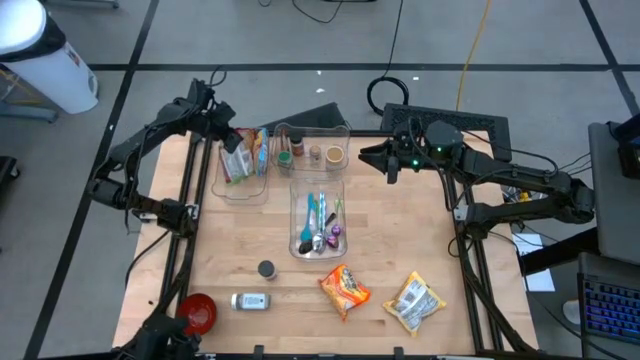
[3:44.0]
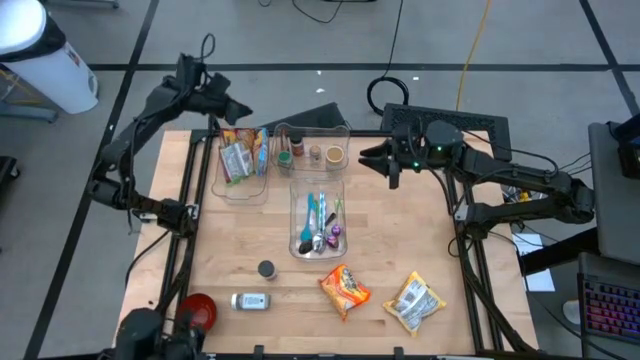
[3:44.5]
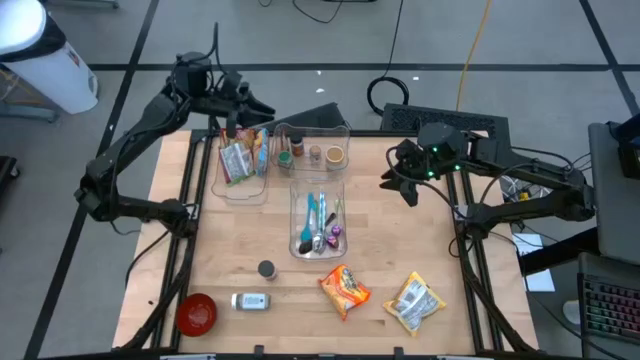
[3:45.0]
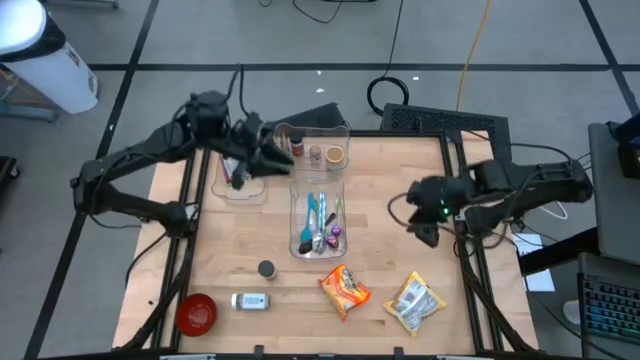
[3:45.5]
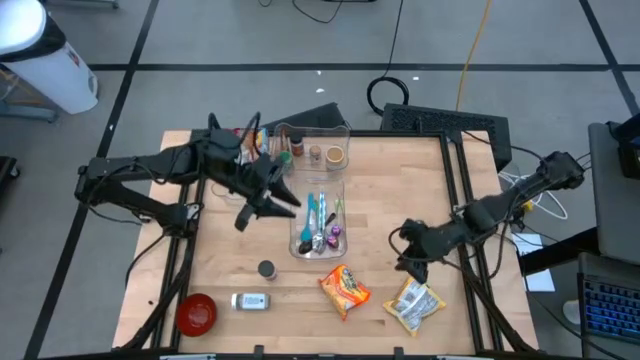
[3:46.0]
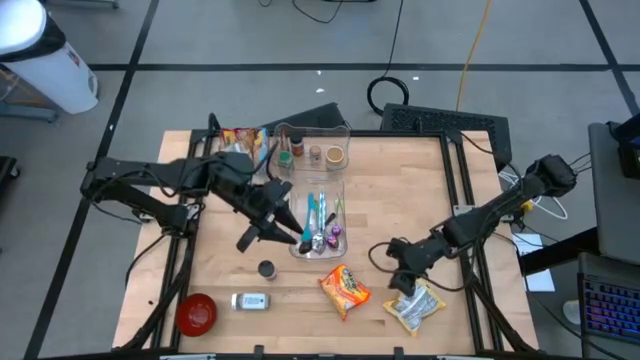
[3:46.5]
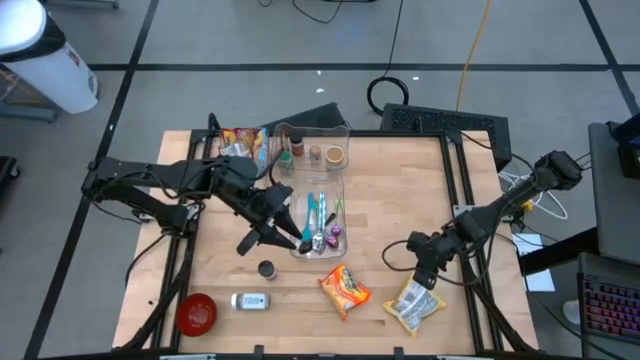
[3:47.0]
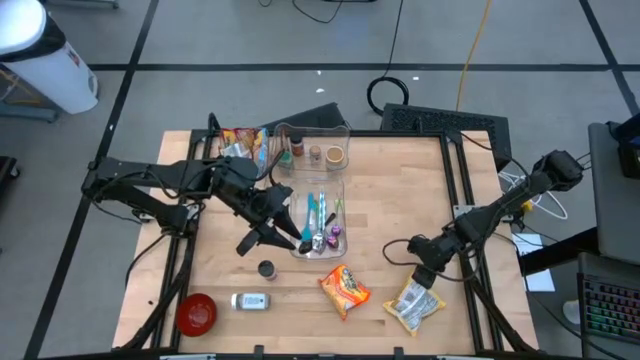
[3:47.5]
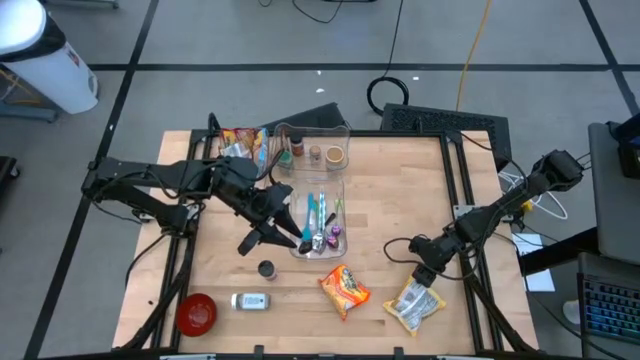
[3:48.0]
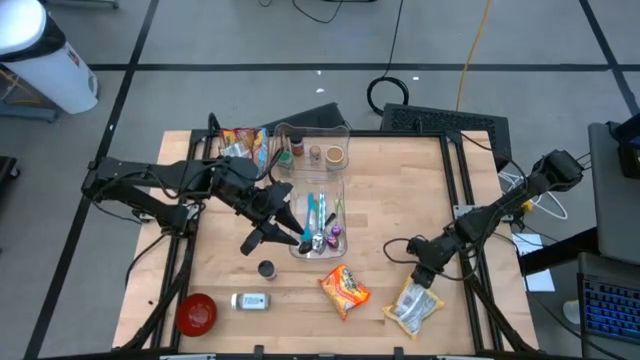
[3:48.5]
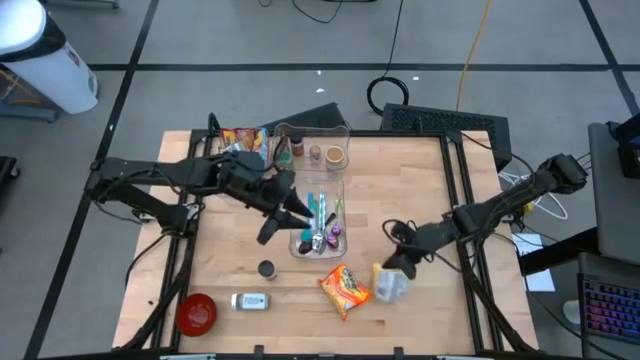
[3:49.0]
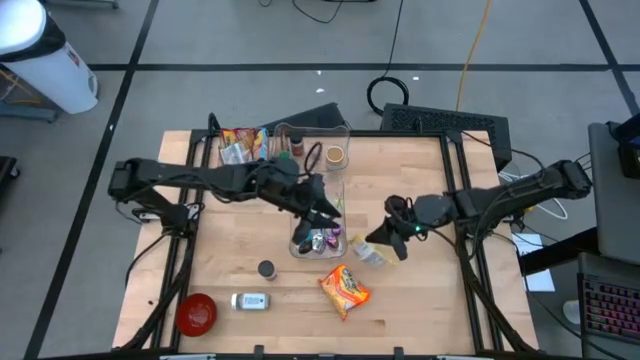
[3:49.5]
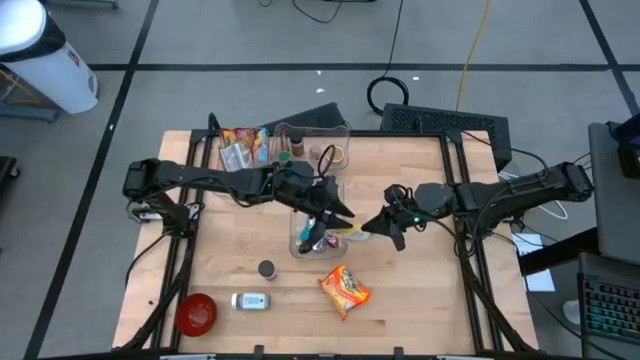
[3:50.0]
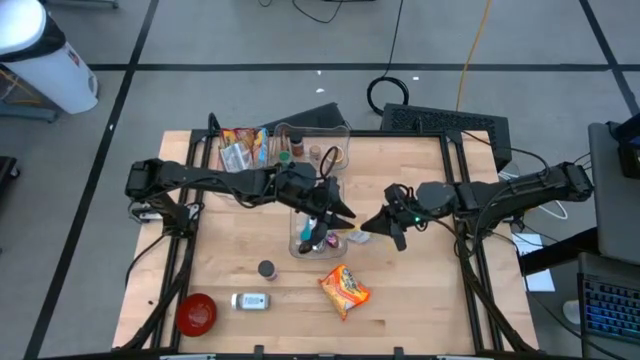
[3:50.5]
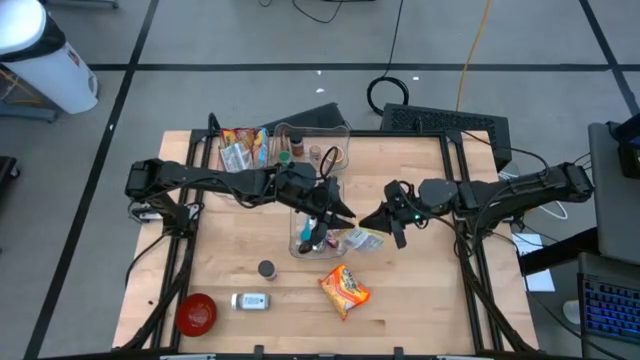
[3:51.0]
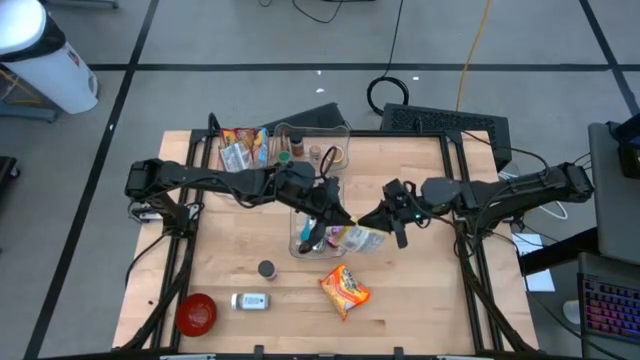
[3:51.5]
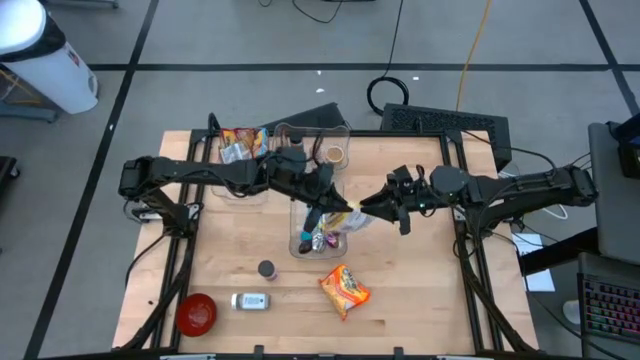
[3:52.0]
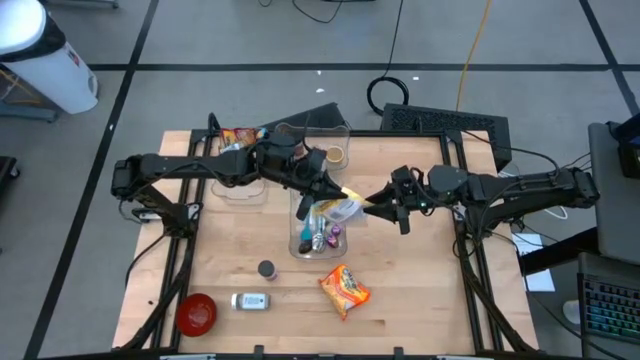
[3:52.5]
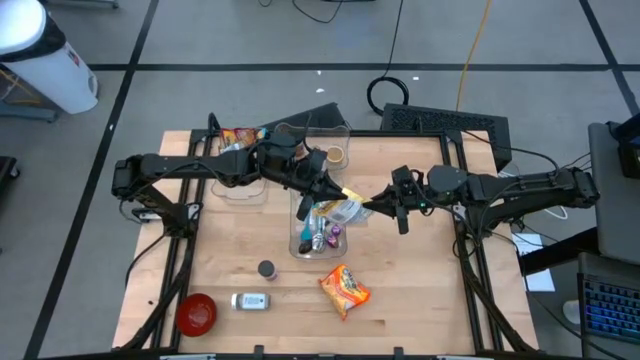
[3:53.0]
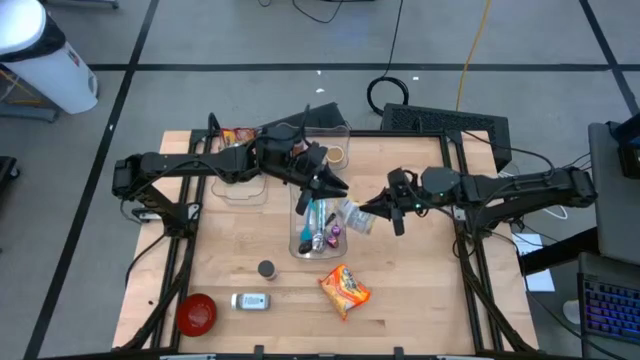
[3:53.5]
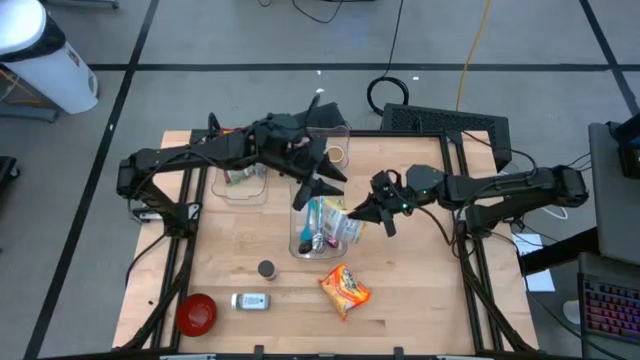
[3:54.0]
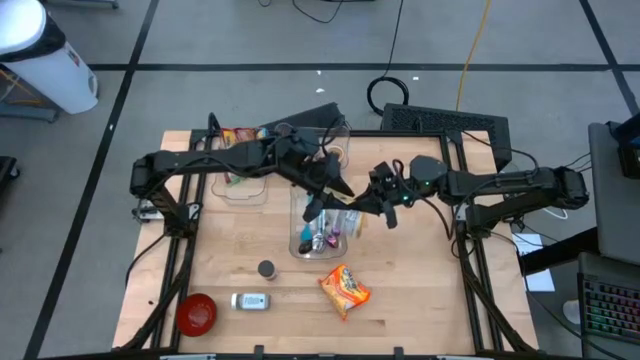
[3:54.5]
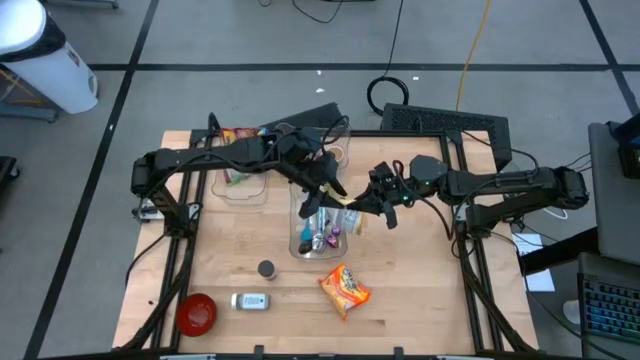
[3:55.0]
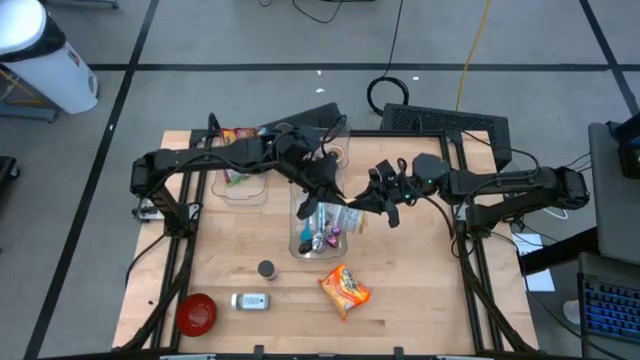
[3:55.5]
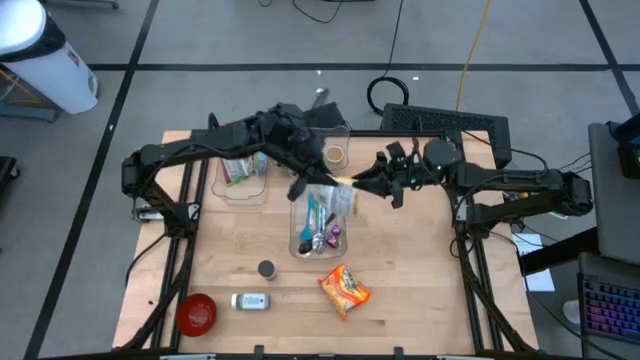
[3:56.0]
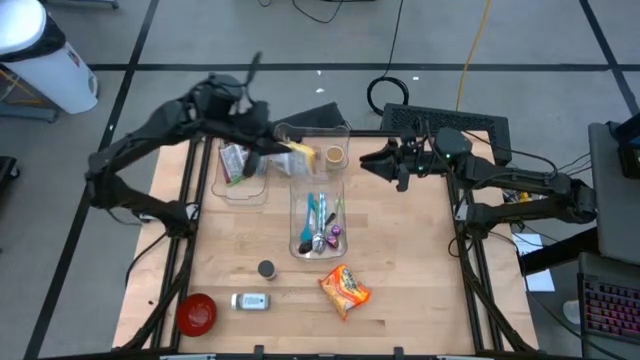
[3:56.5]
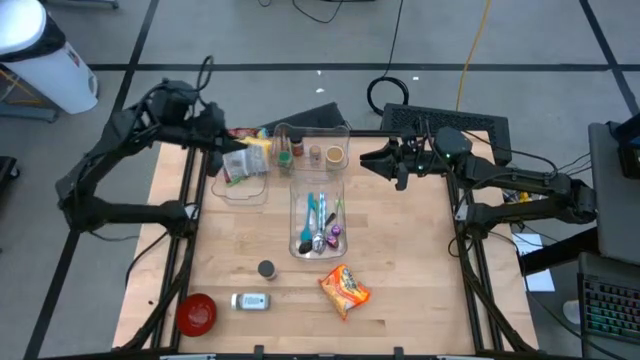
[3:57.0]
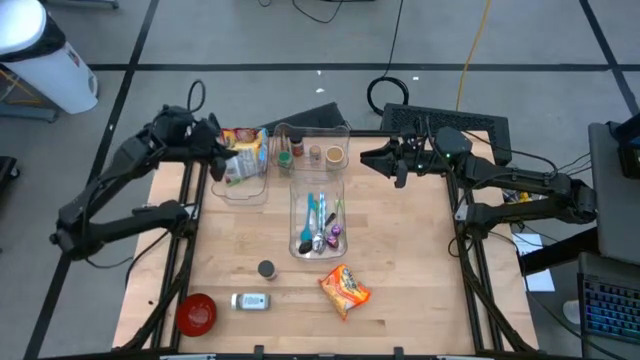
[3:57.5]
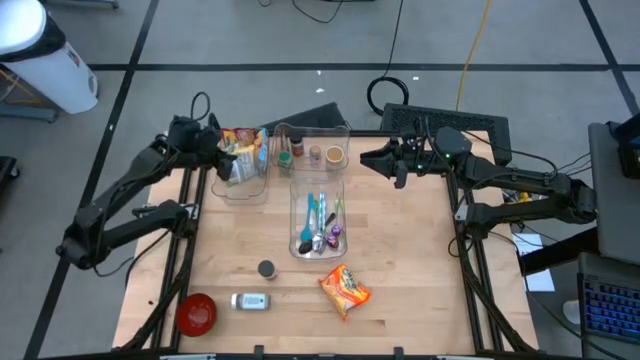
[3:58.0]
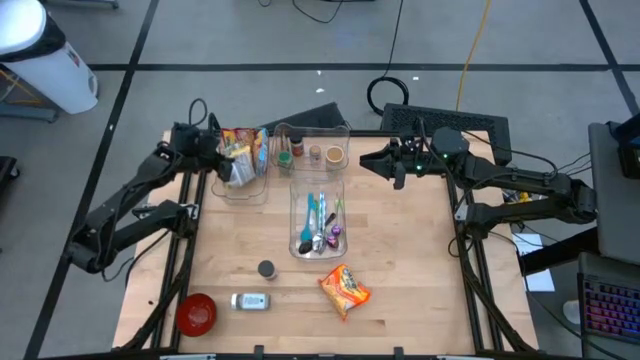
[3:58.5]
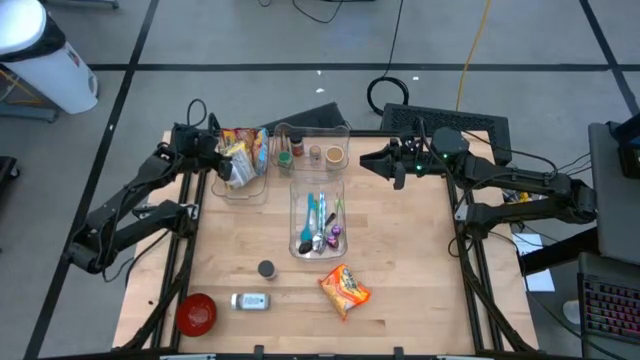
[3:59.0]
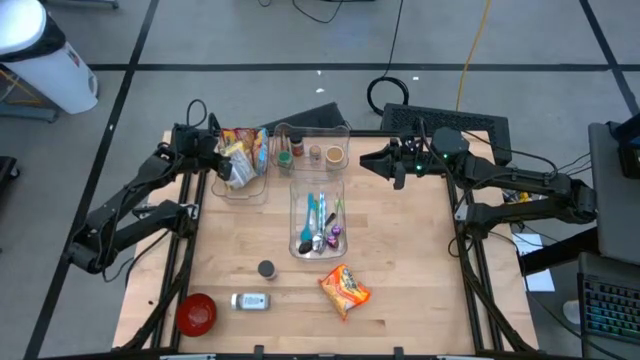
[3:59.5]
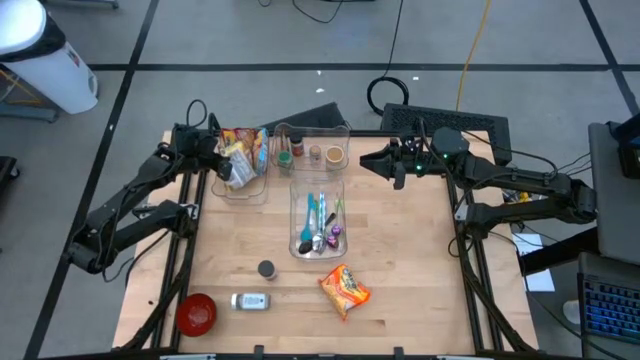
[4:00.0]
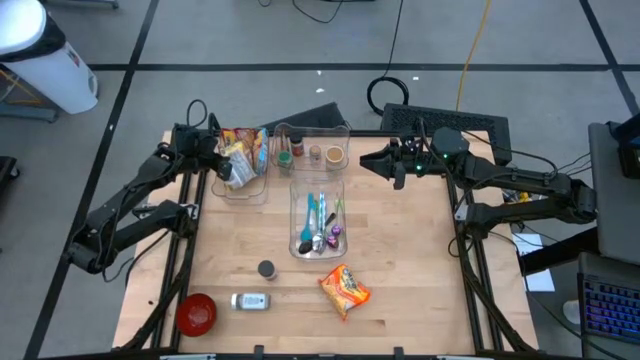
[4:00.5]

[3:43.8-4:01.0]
Task: Pick & Place Food Item
Put the yellow noodle pack into the top left transparent bin
